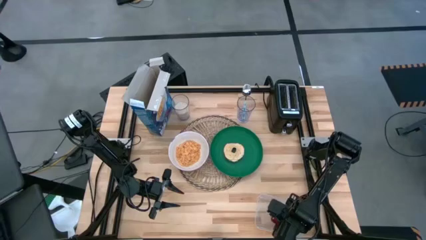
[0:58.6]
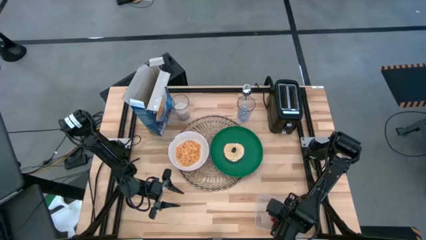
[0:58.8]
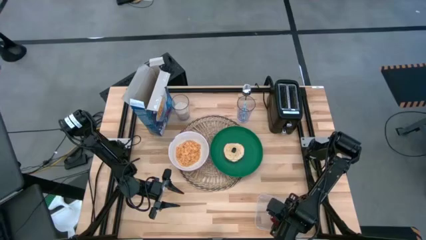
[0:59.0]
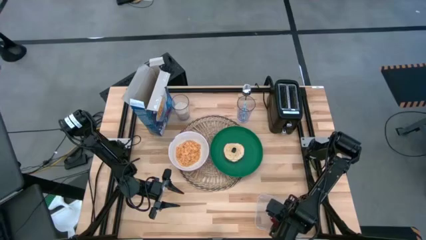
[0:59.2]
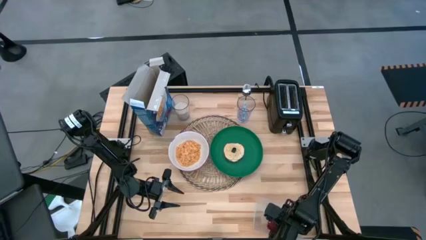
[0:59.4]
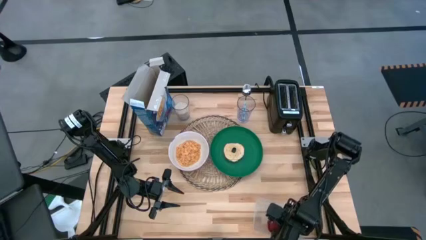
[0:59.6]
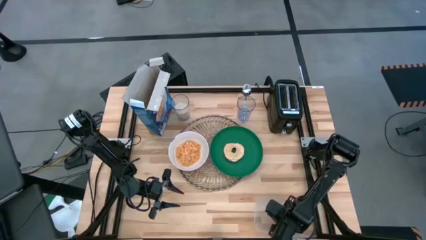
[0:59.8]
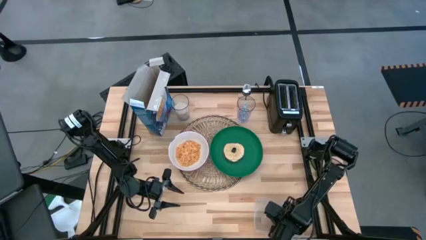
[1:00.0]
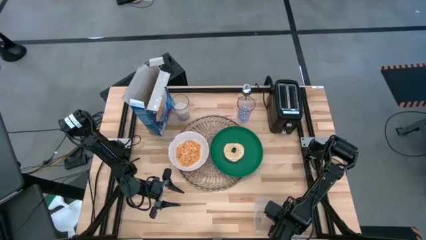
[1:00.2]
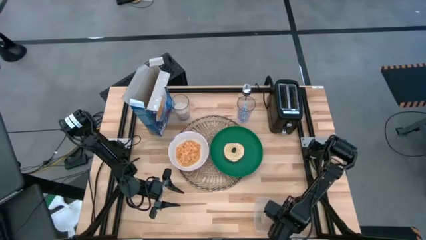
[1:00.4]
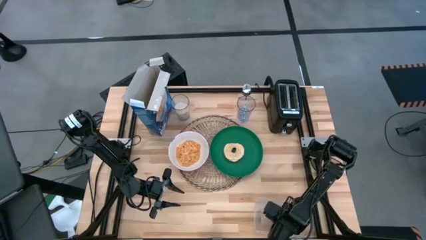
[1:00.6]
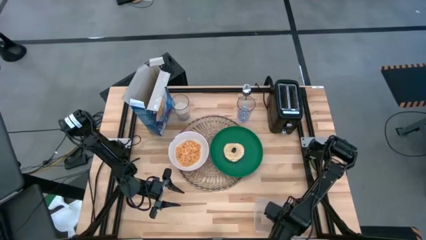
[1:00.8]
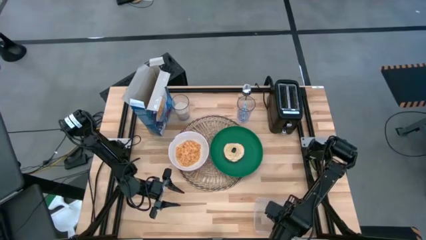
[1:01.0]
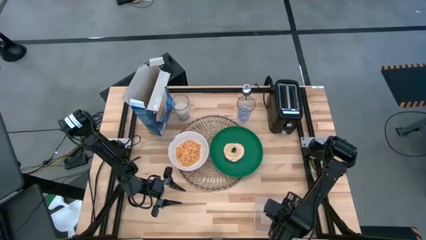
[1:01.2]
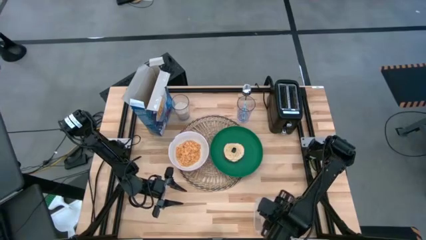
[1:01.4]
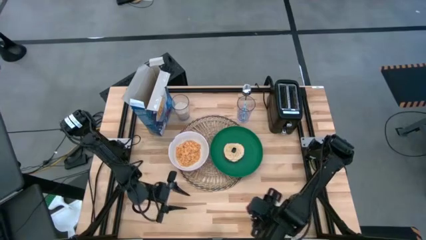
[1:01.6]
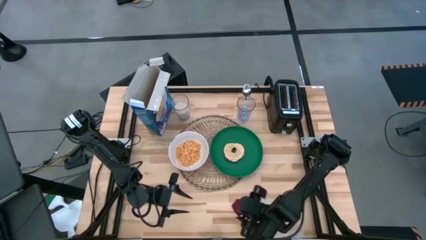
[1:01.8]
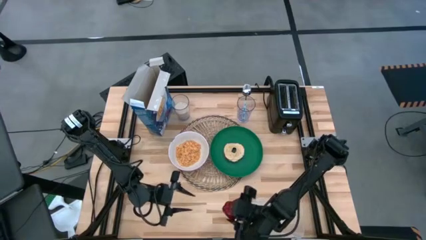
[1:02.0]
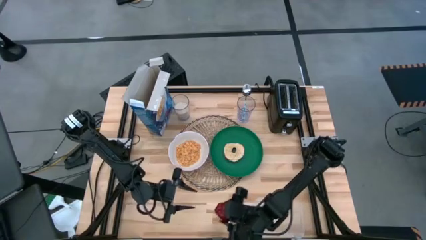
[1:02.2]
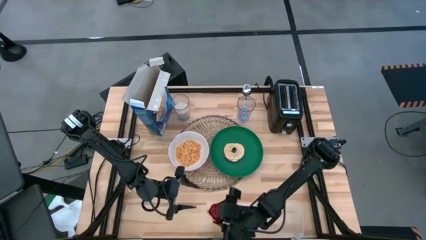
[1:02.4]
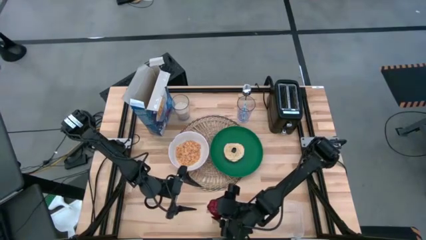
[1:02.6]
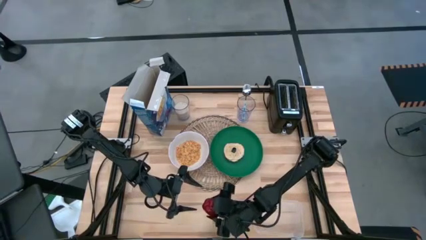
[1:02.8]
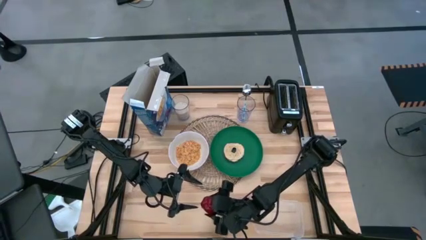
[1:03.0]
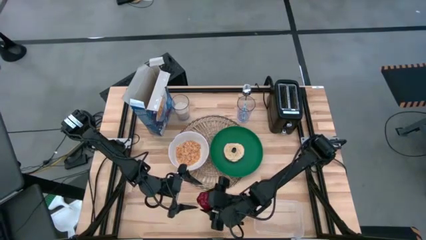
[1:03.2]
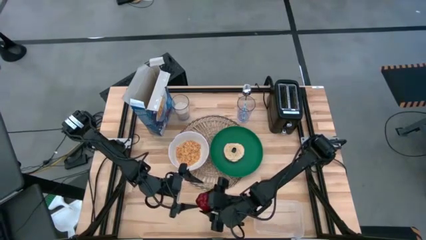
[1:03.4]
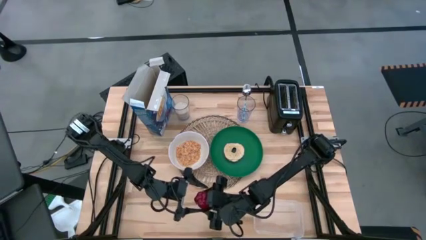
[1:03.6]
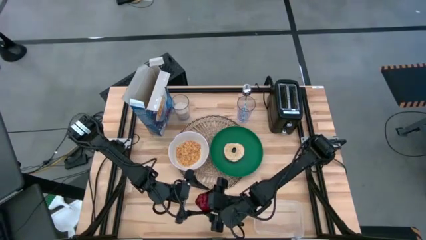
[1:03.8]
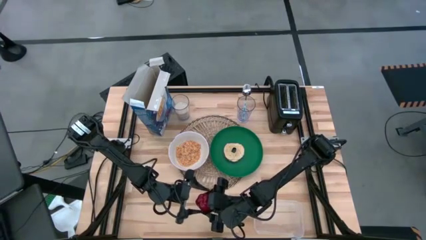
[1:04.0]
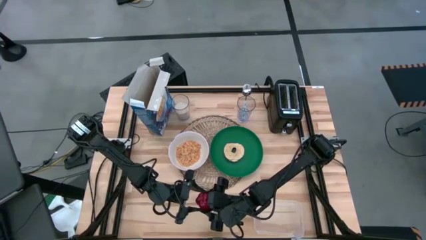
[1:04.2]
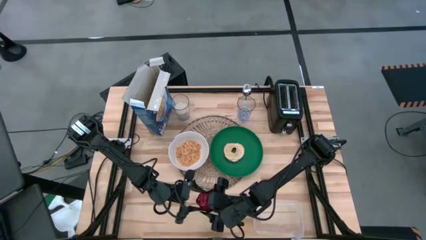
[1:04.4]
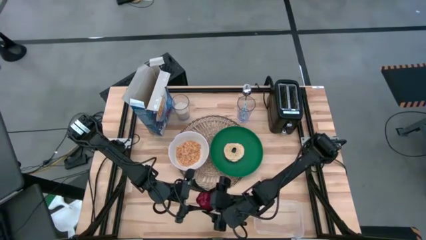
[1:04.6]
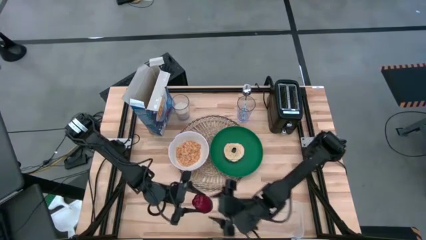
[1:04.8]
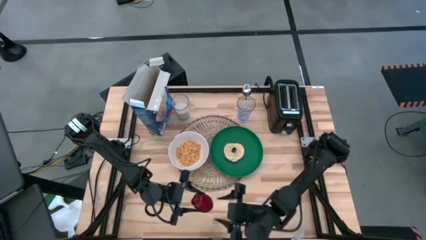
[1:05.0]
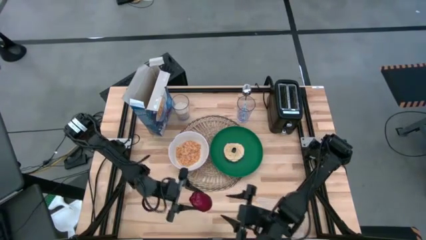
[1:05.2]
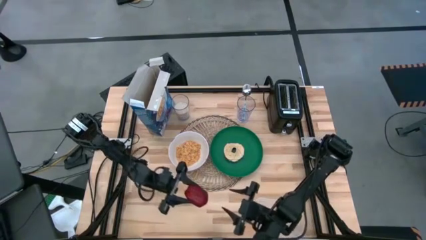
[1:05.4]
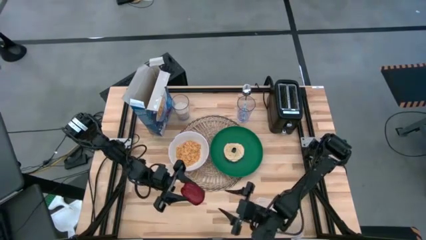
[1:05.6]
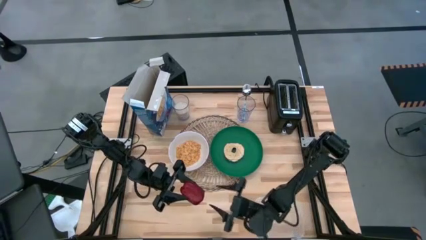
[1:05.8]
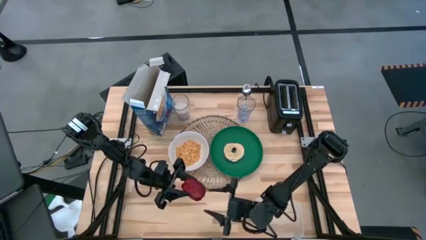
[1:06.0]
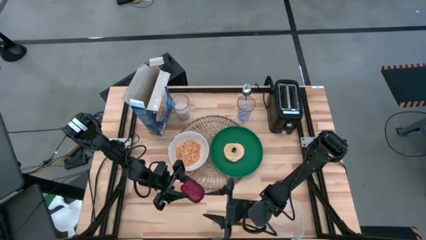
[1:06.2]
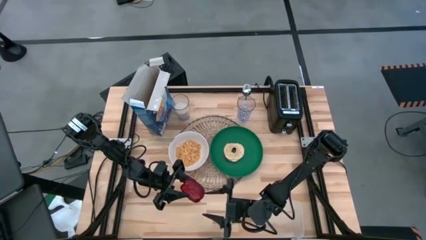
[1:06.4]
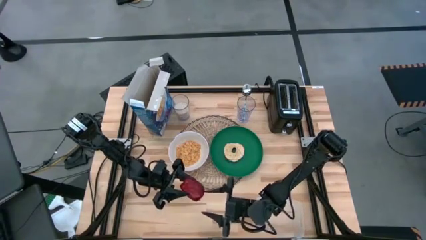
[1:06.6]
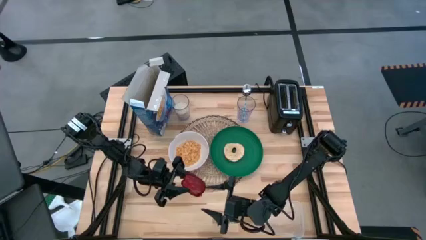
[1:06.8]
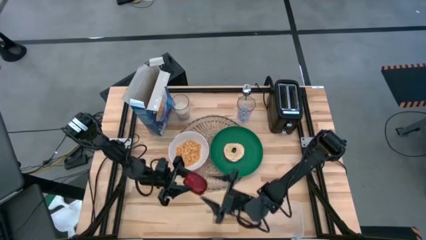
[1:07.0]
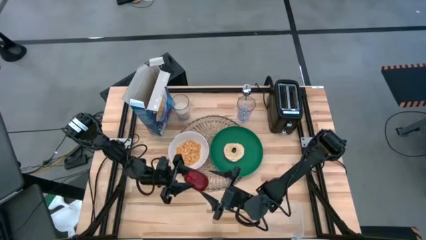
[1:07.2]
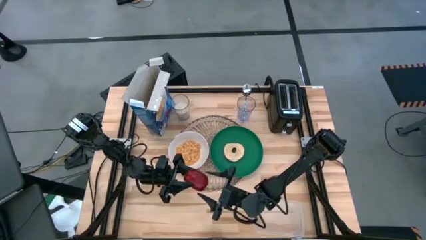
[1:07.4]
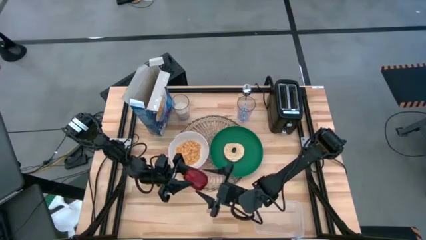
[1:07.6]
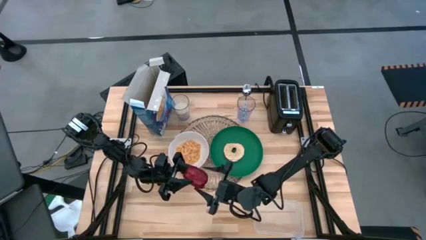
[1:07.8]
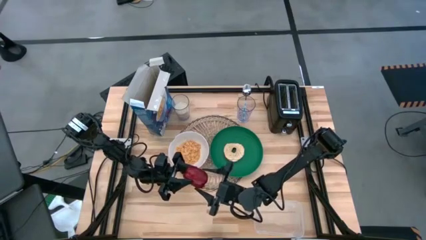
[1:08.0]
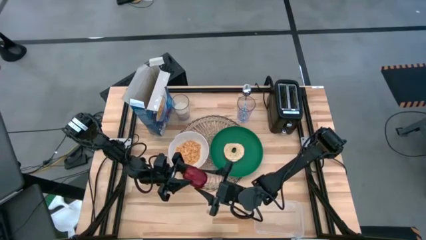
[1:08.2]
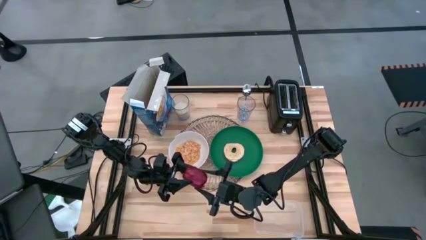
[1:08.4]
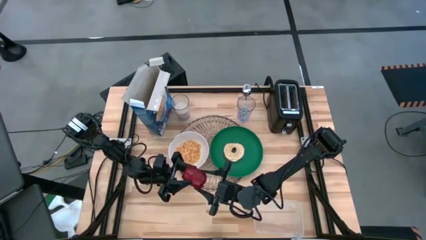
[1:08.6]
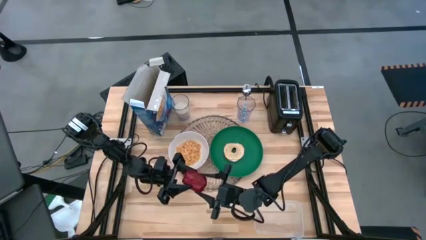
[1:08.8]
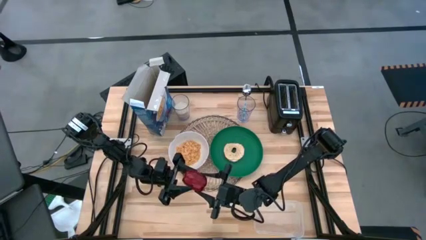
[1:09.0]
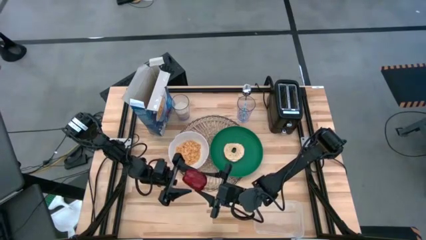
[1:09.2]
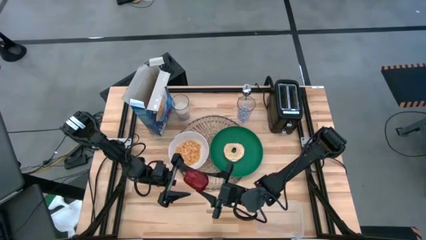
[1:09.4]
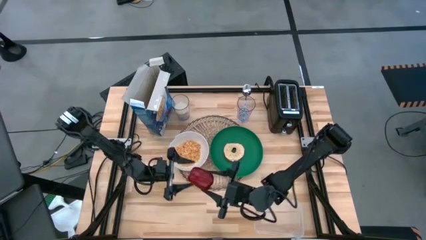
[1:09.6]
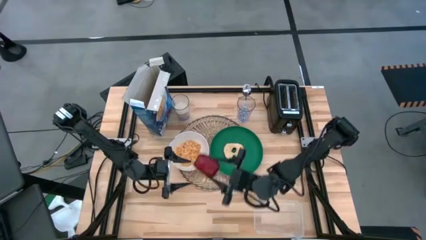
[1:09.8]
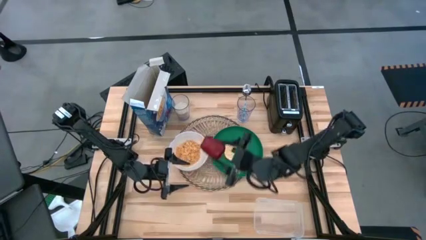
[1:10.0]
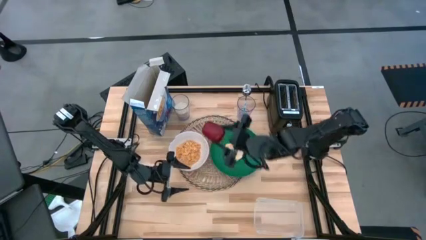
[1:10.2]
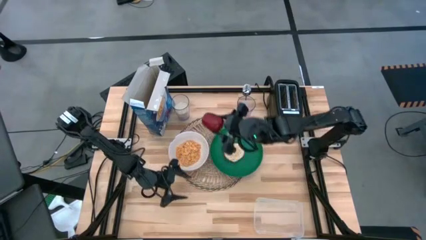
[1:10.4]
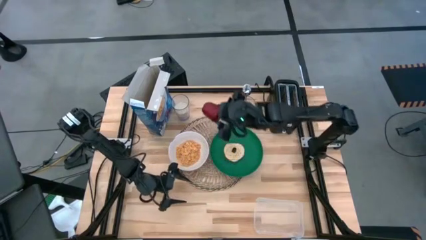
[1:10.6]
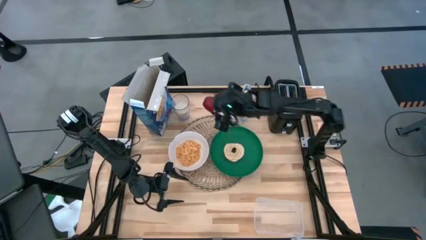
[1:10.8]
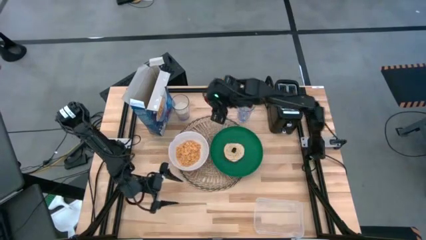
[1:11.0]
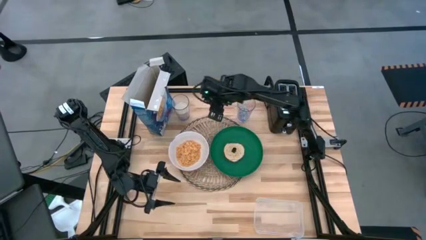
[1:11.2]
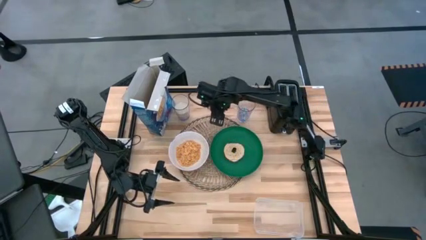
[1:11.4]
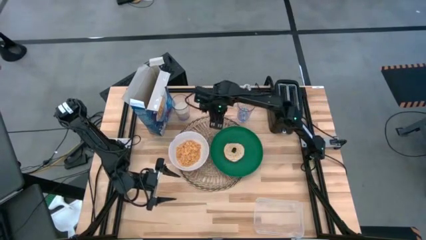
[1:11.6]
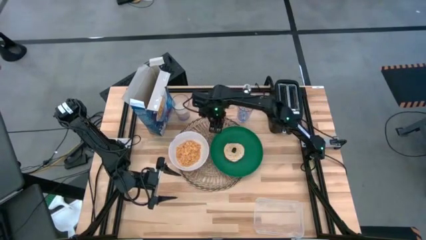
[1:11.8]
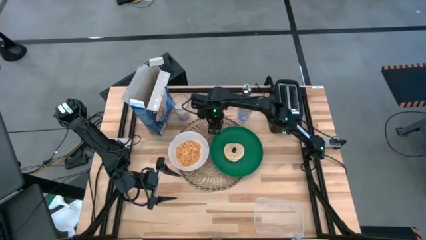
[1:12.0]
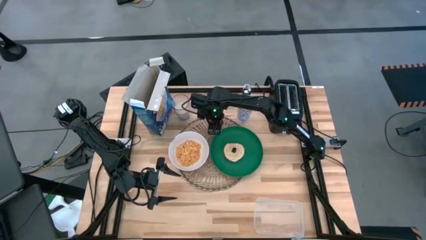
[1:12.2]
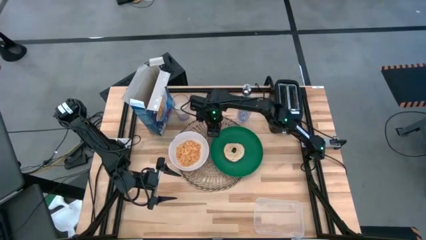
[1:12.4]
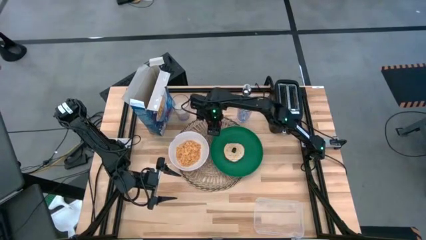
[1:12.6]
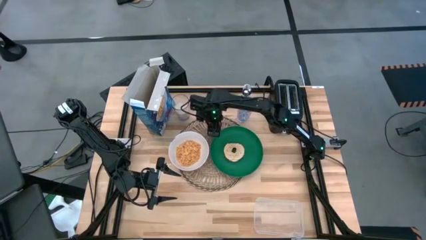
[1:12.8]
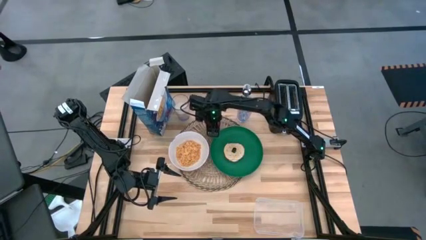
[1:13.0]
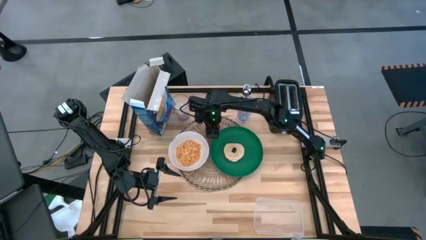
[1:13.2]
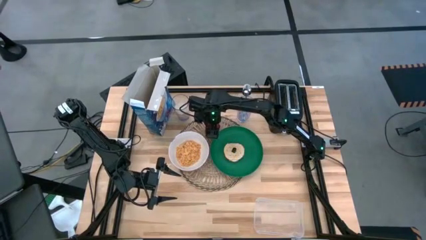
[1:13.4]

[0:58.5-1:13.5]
Task: Arrange a breakfast setting
Put the apple on top of the brown placemat
